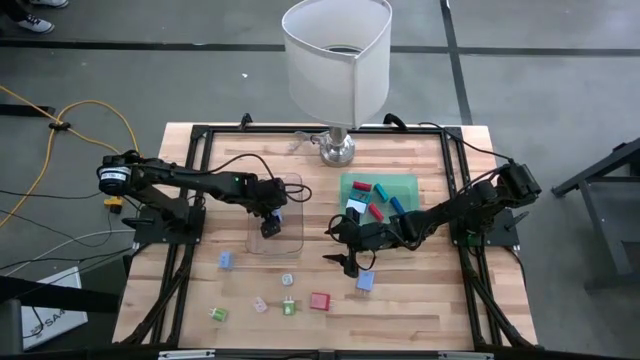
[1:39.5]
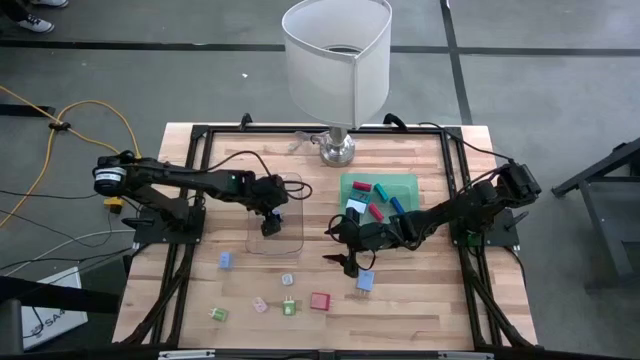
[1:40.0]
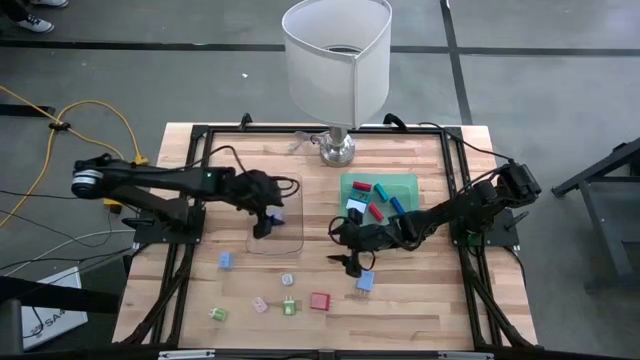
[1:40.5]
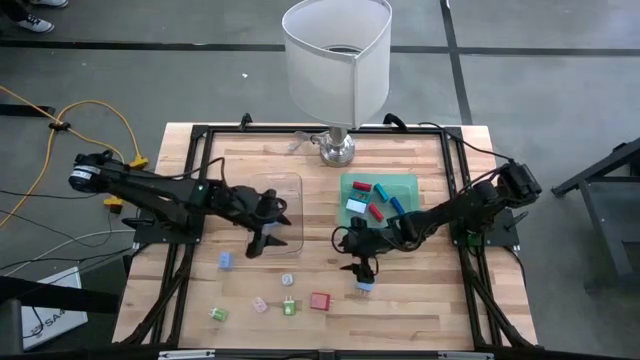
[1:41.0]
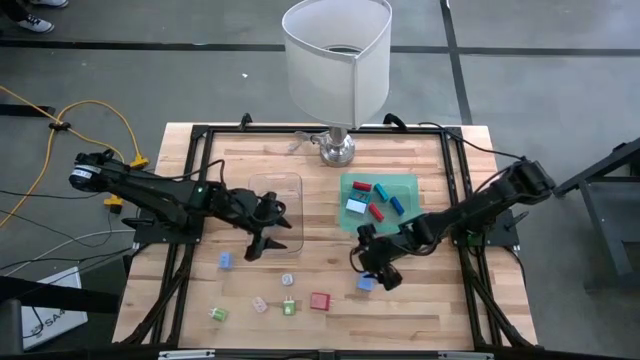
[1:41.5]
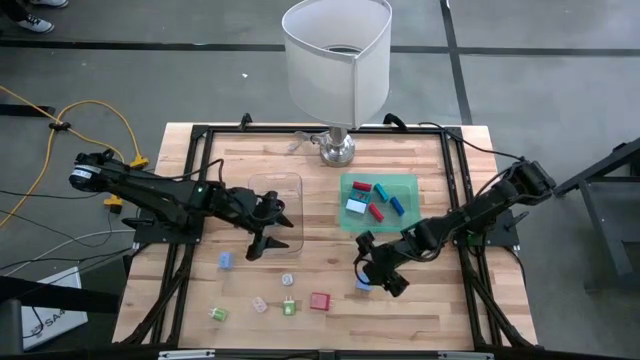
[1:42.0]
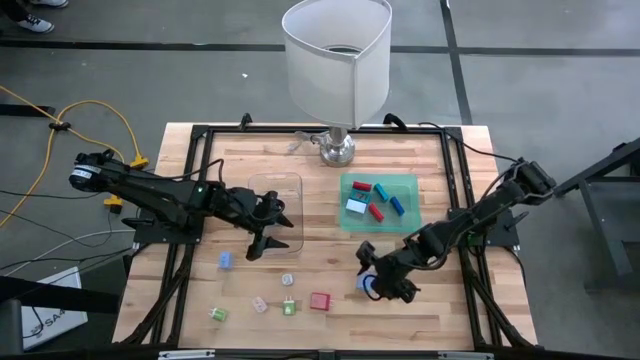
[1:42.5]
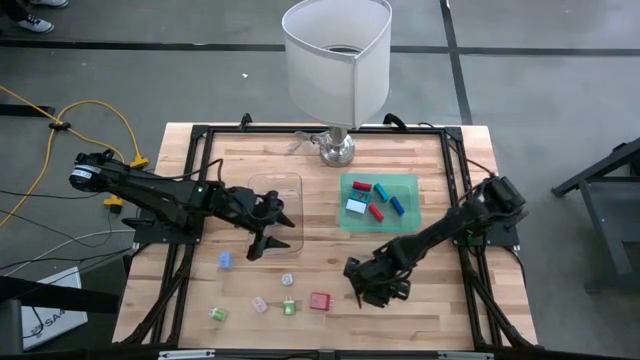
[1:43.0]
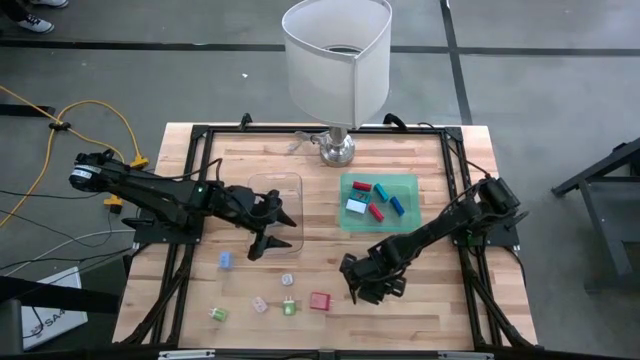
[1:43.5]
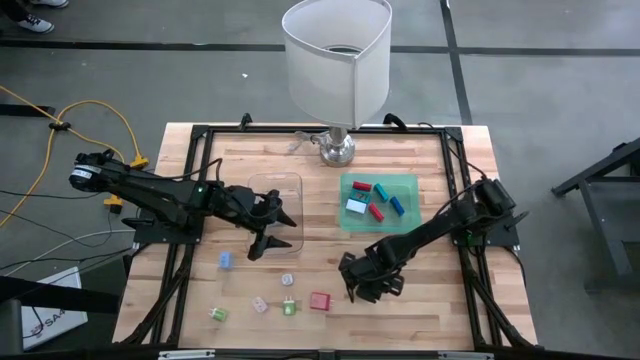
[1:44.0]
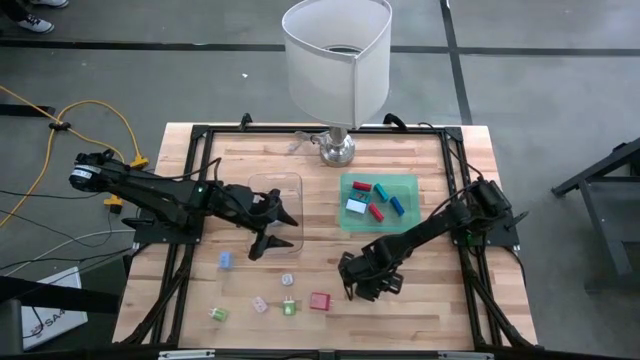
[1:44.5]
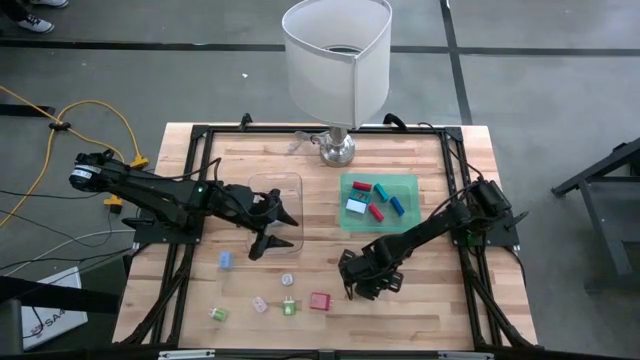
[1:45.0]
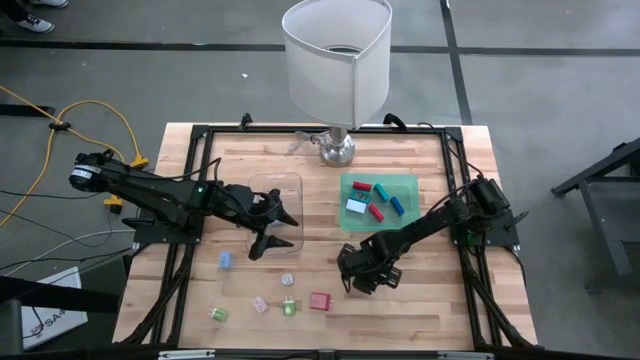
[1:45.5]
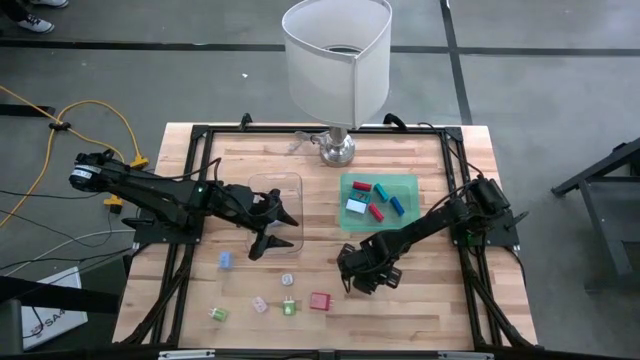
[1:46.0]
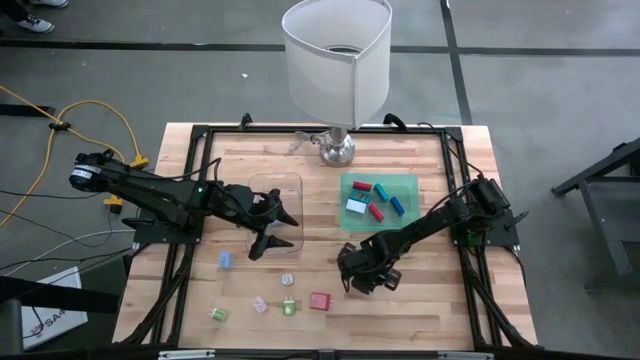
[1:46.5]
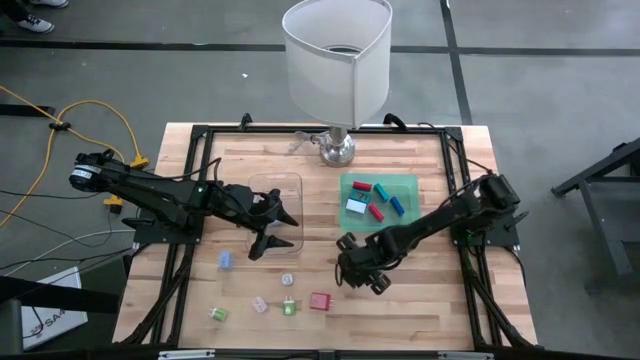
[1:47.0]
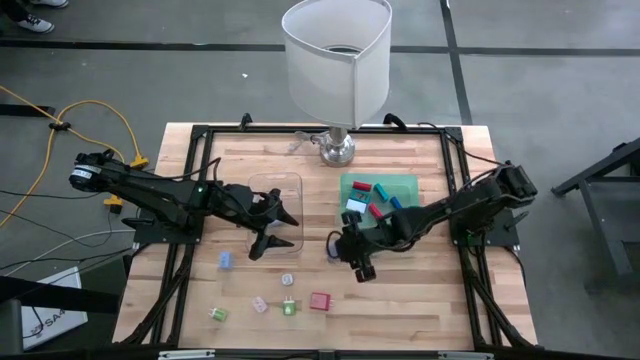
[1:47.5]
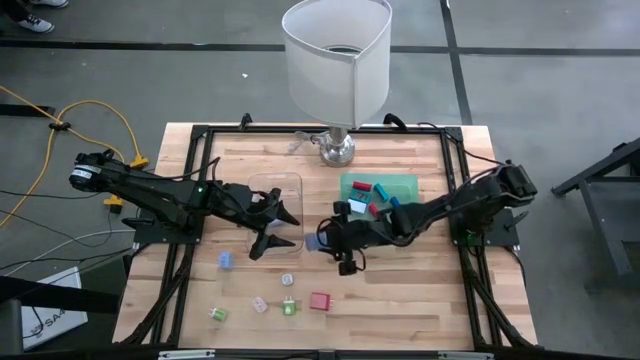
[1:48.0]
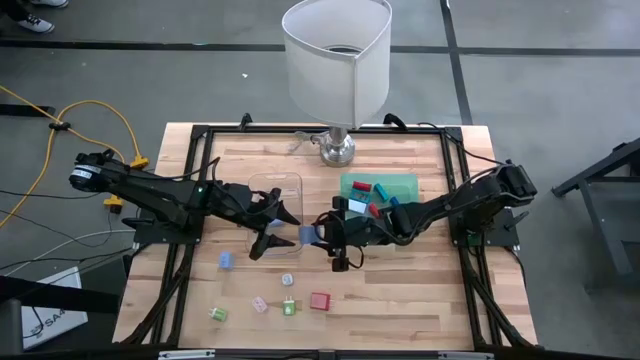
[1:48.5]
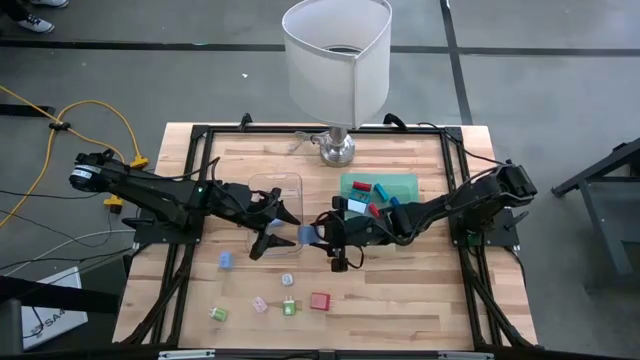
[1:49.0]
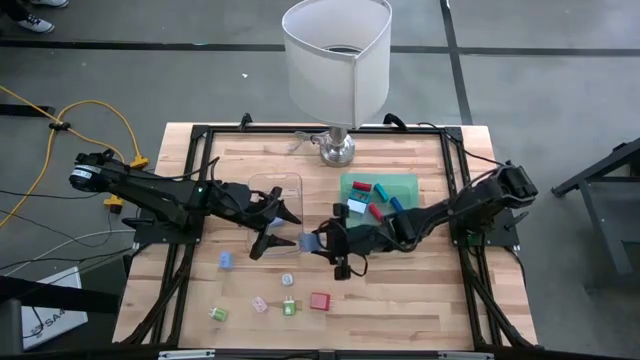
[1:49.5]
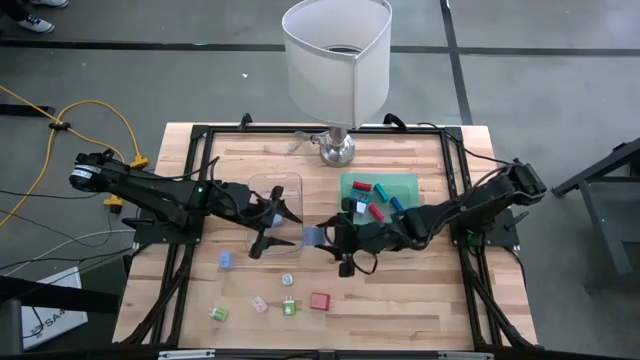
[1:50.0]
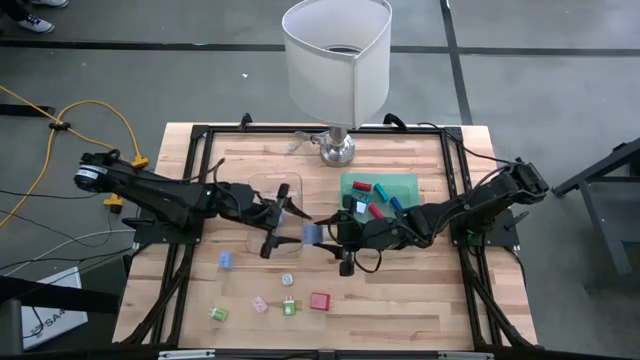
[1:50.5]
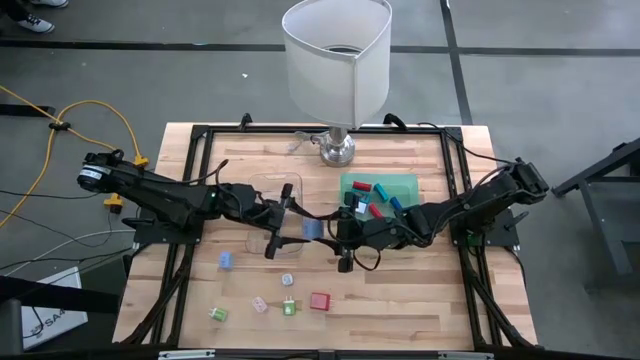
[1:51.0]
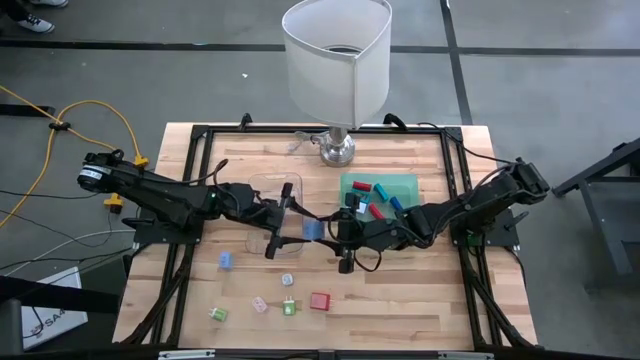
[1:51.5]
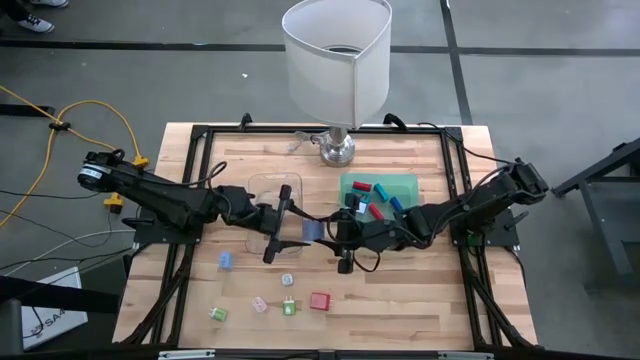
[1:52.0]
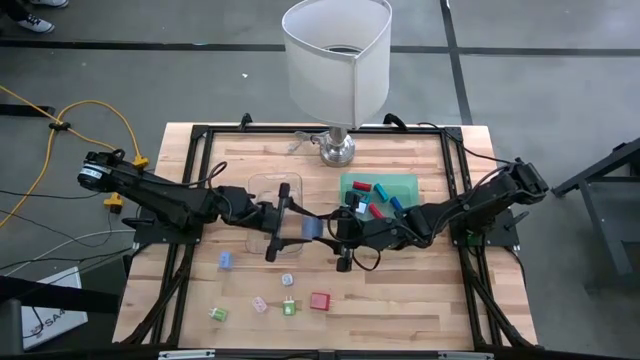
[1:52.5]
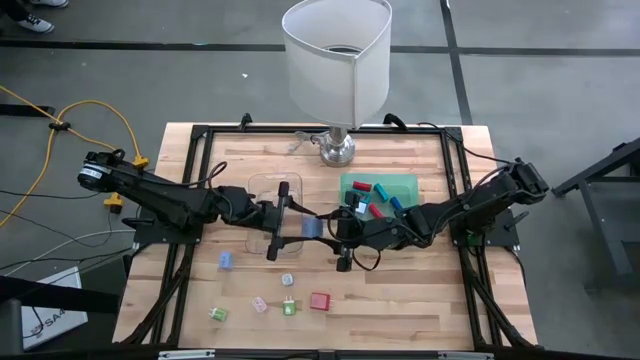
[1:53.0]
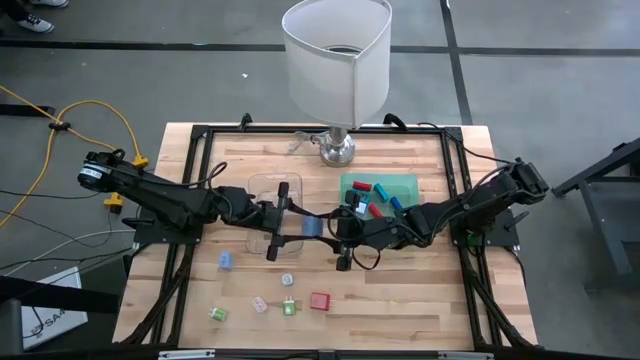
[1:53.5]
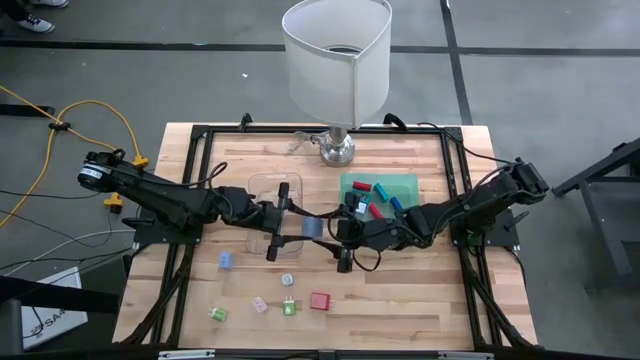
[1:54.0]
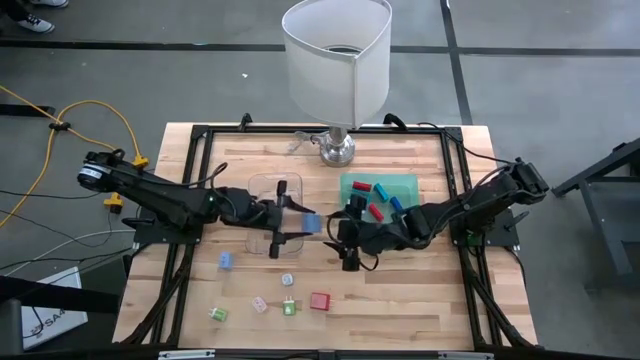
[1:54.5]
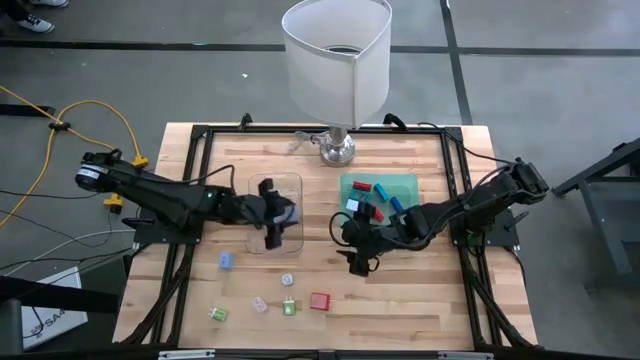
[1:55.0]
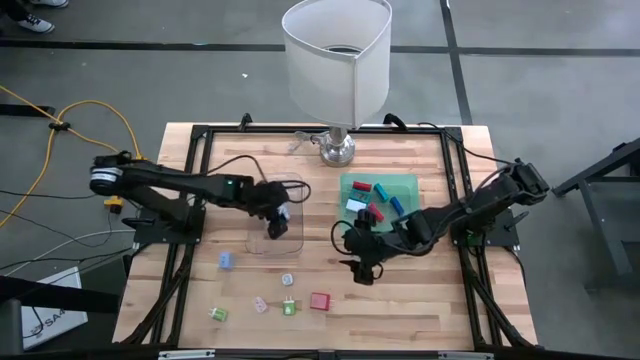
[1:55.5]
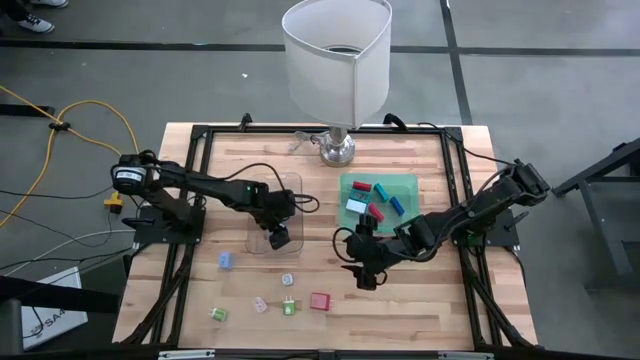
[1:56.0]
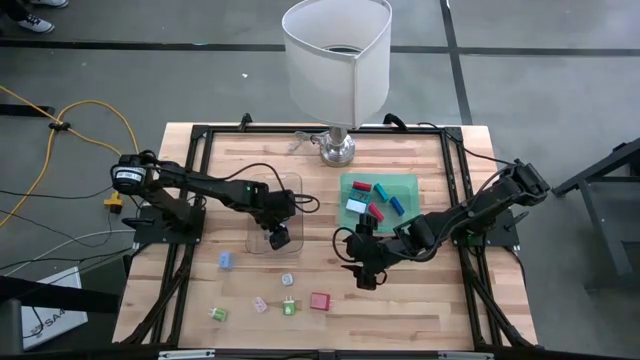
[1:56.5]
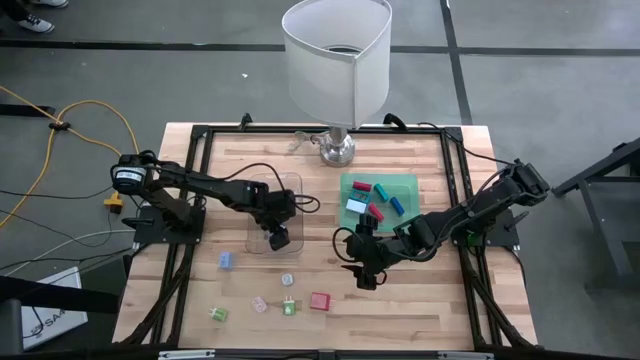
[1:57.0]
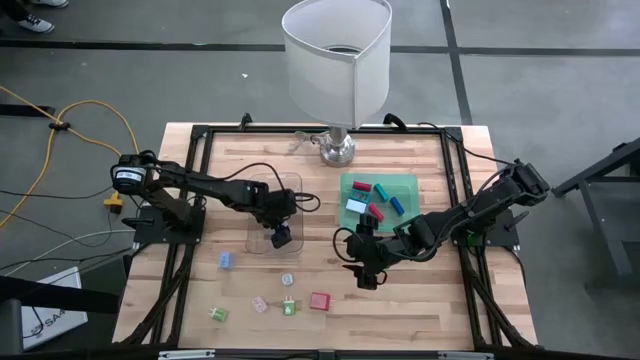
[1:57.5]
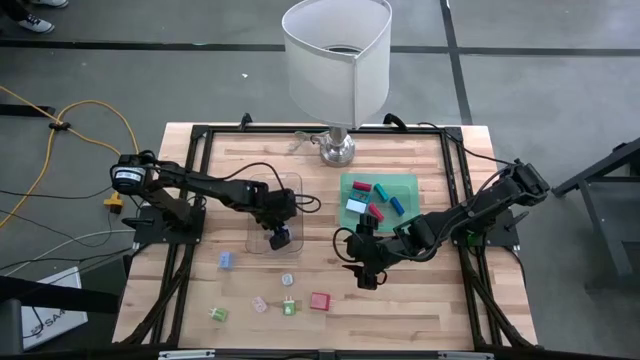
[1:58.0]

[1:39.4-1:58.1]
Task: Pick & Place Office items
Put the right blue charging into the transparent bin

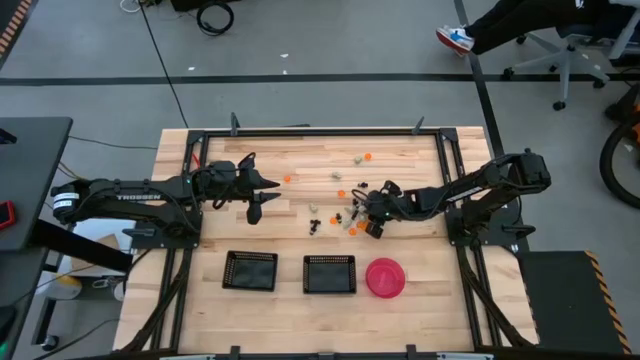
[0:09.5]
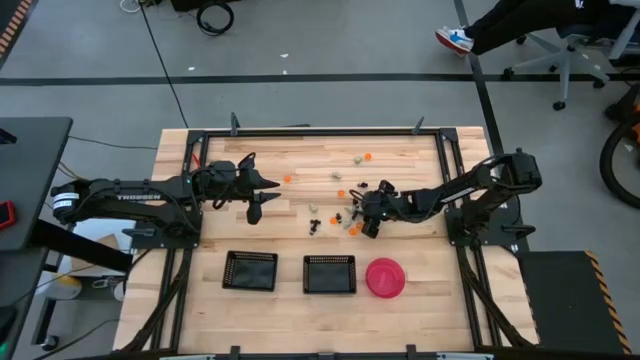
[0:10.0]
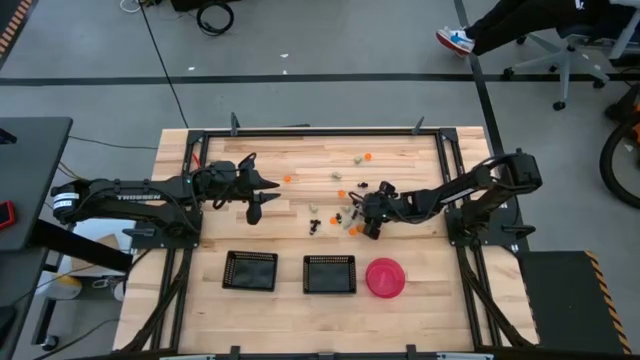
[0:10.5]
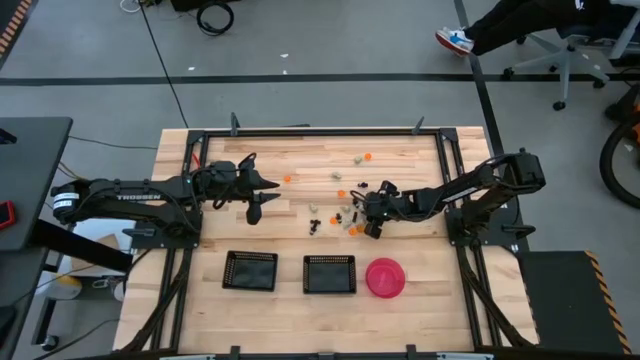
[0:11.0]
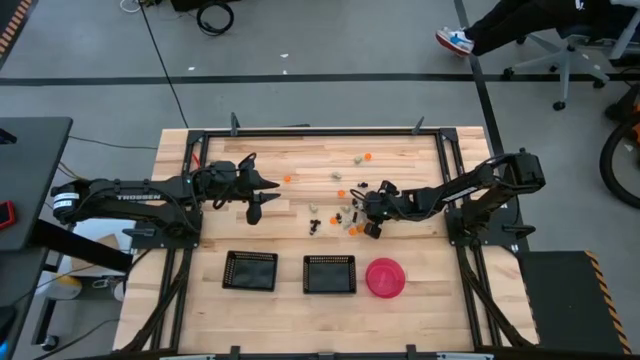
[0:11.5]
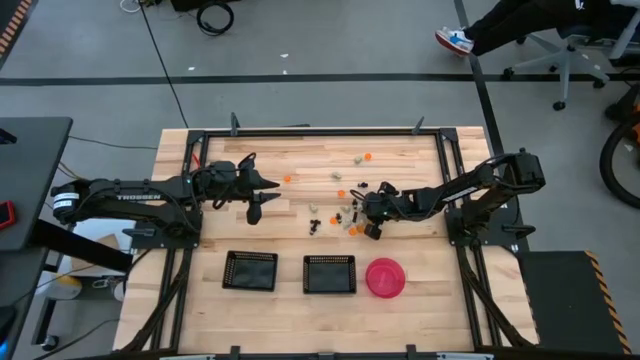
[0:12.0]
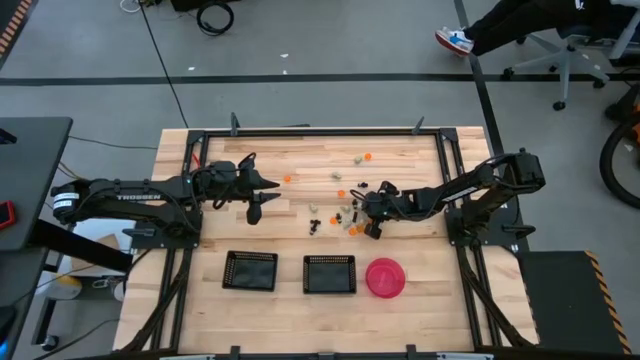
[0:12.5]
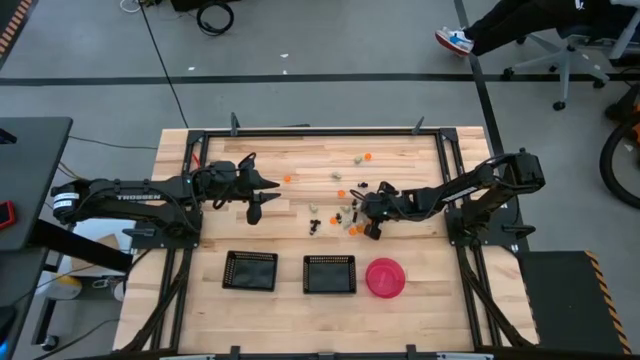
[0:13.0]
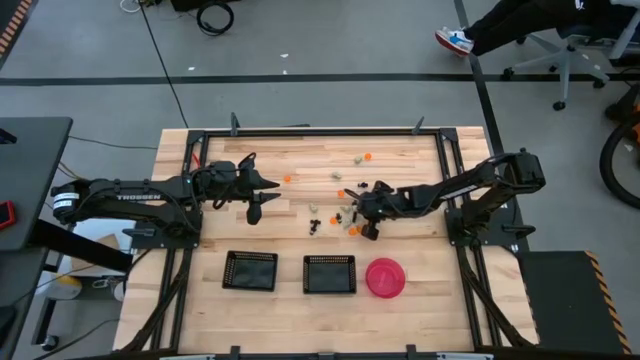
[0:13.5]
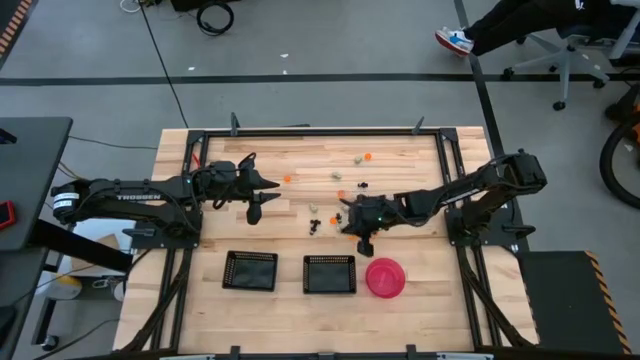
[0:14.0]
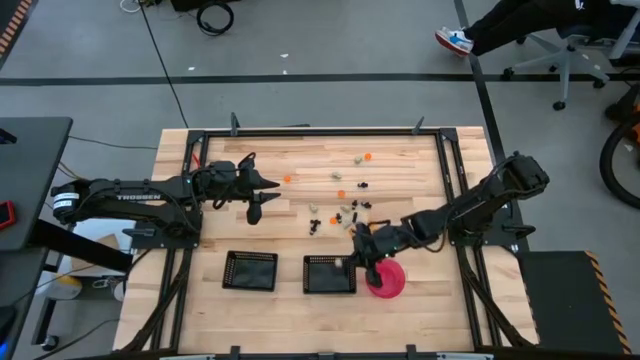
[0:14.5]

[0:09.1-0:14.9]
Task: Sort Halloween decoration
Put the white skull toy into the right black bin
